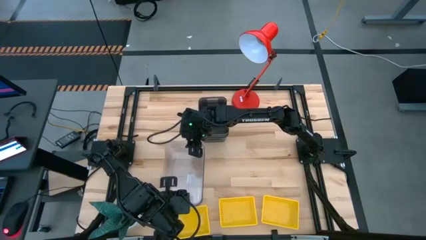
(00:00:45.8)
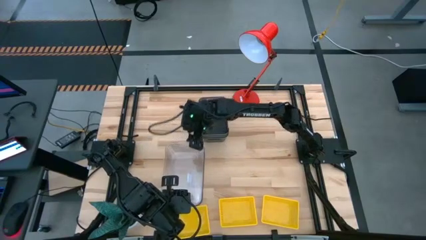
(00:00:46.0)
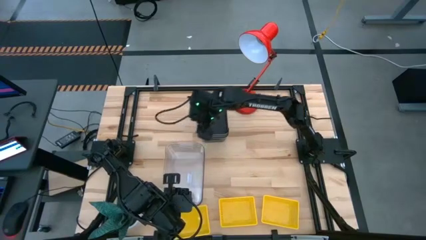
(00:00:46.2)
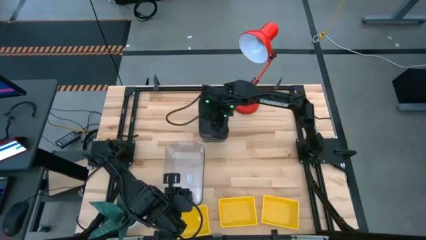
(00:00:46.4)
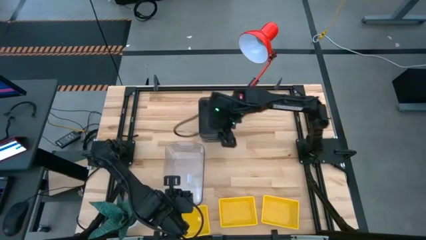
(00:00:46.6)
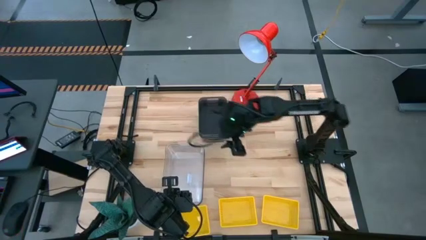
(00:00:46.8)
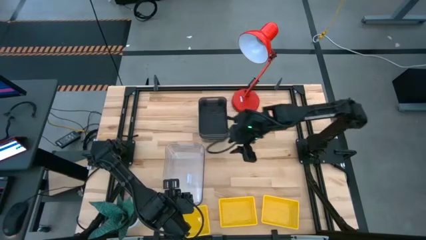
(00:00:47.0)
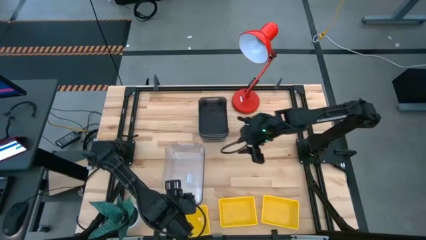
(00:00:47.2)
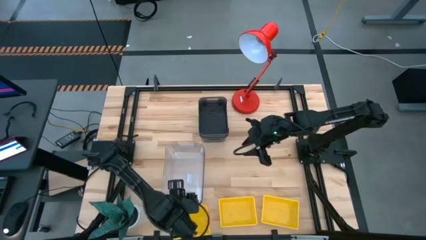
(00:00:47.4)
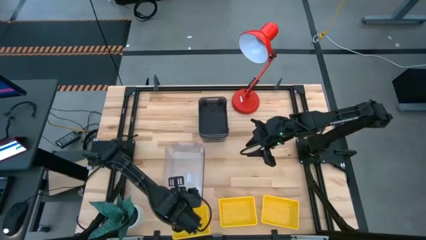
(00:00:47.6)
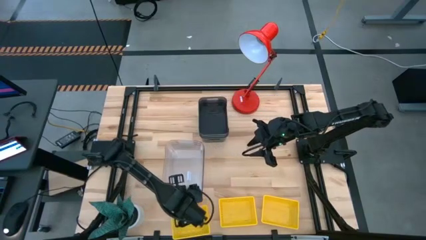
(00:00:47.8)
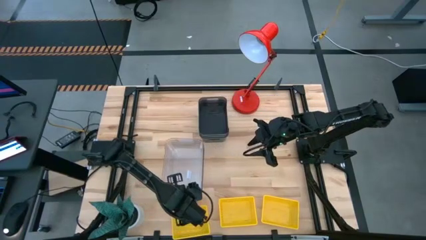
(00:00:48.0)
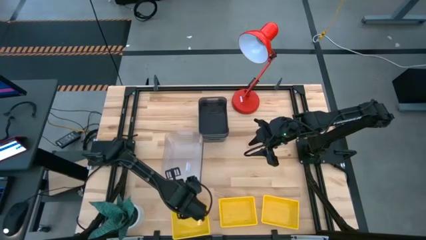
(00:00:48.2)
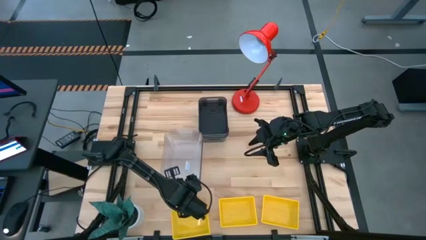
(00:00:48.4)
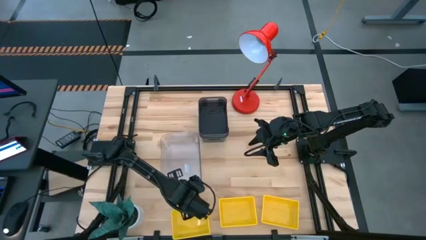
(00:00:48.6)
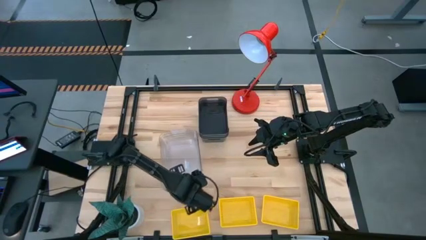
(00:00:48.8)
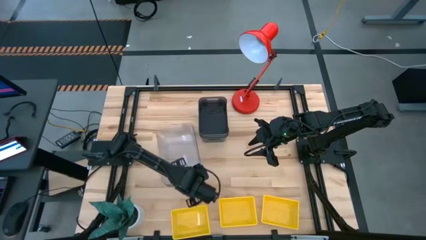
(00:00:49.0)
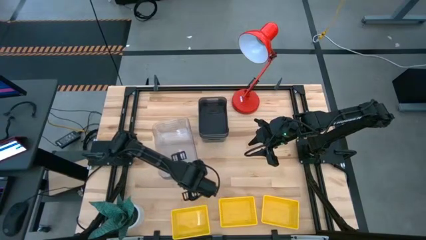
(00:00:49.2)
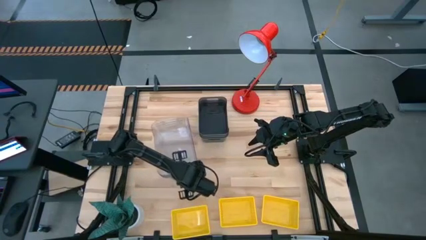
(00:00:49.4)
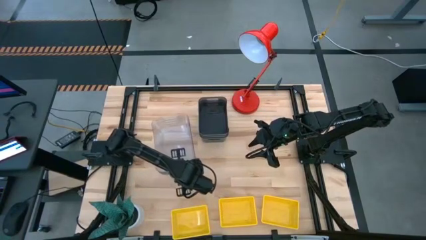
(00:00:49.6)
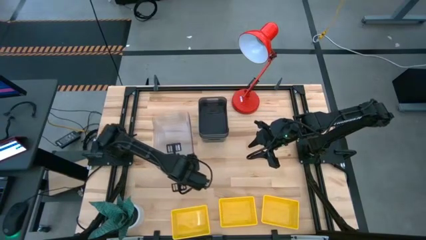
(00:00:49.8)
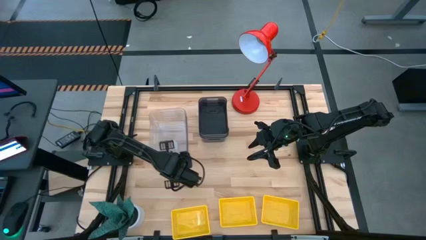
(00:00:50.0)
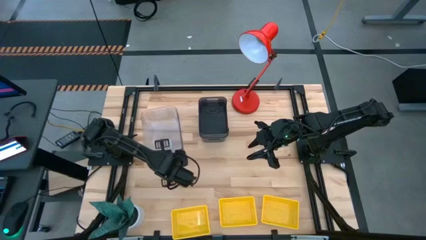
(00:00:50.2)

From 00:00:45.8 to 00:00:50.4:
Move the transparent bins to the top left of the table

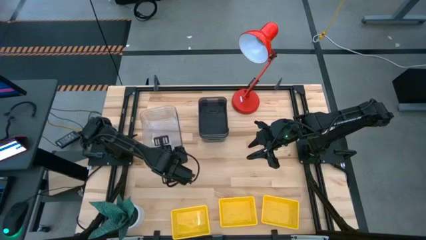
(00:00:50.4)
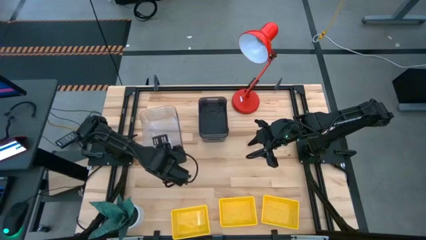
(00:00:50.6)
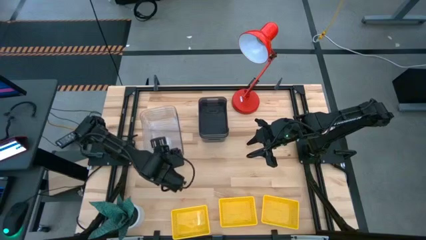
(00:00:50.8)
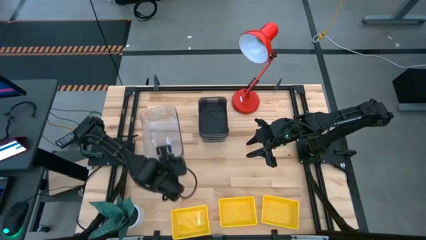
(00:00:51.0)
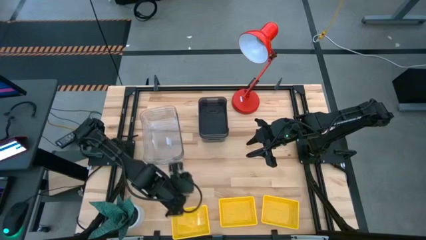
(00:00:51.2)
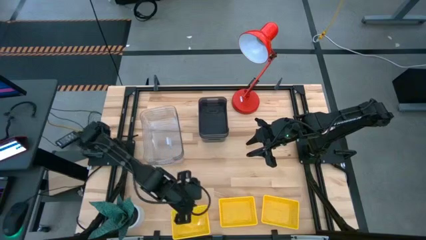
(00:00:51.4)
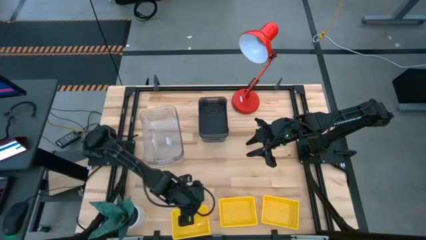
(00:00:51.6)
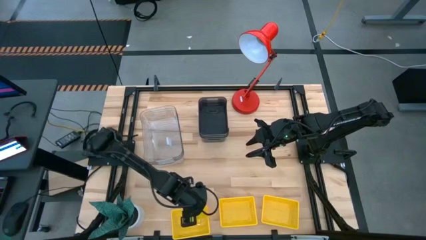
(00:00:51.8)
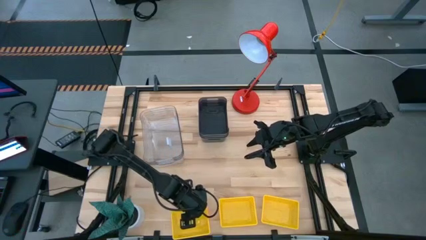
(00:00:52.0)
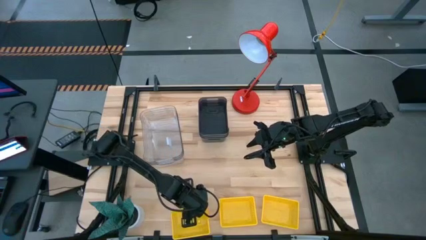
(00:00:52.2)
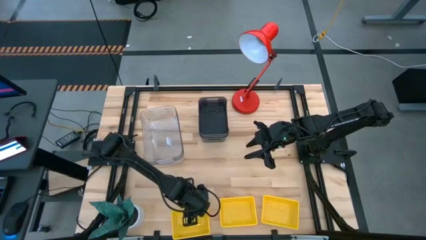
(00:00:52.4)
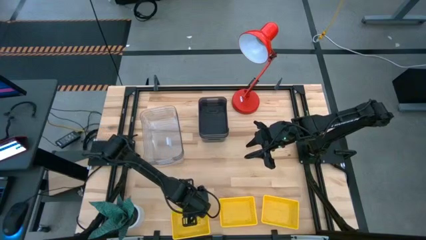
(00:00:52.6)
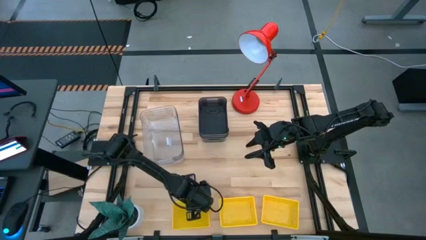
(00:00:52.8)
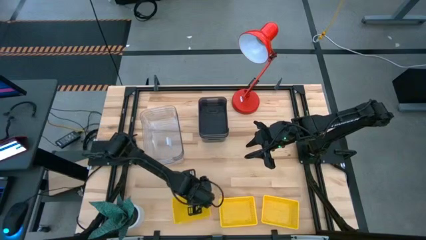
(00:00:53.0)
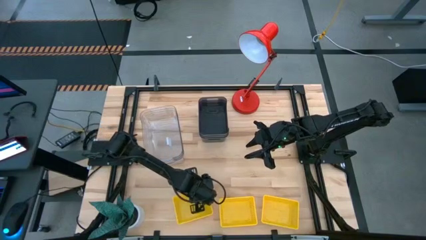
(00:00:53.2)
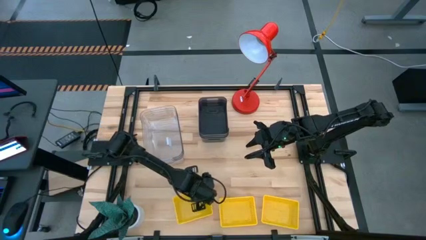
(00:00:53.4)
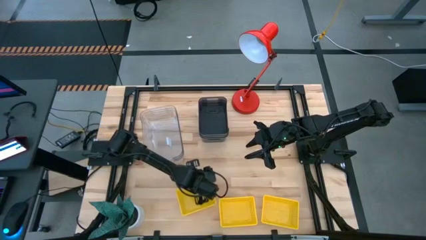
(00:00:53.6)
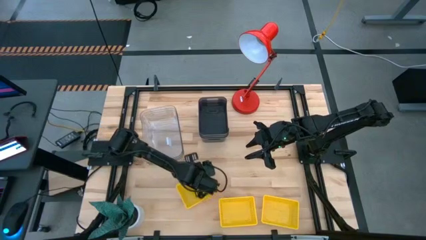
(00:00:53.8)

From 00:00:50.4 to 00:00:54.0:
Move the left yellow bin towards the center of the table

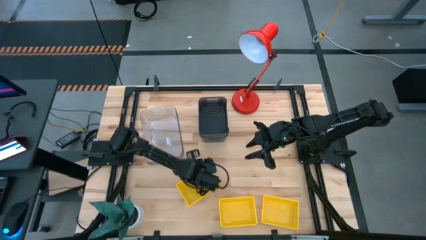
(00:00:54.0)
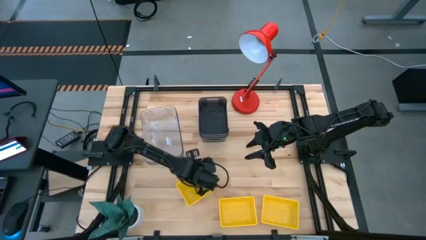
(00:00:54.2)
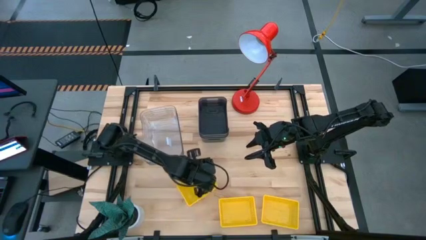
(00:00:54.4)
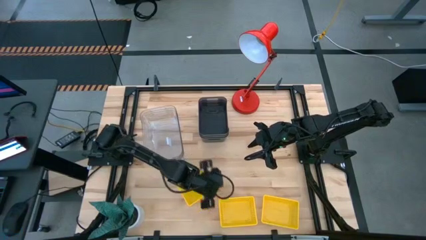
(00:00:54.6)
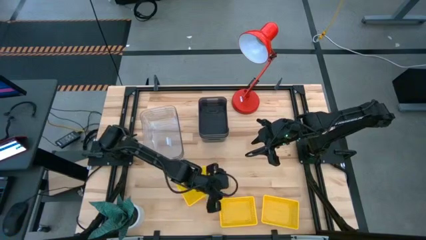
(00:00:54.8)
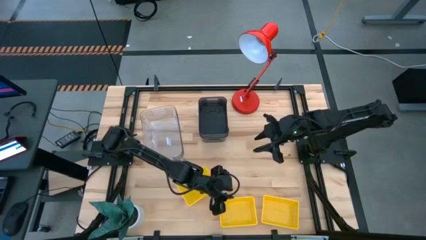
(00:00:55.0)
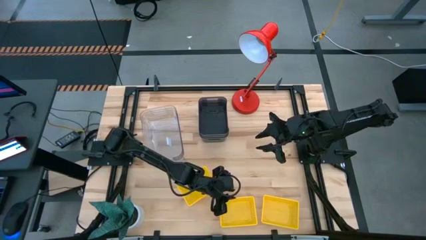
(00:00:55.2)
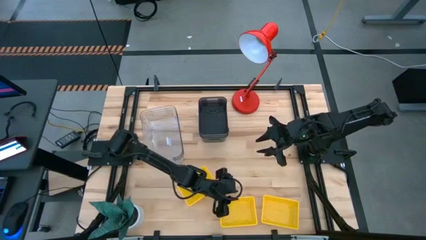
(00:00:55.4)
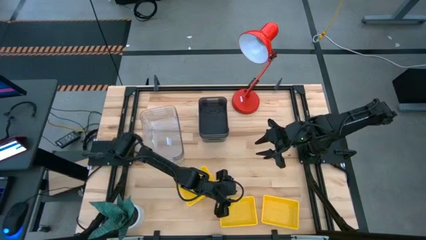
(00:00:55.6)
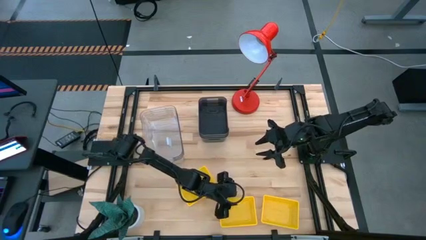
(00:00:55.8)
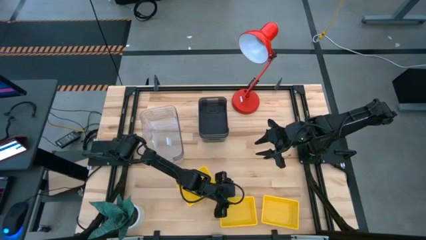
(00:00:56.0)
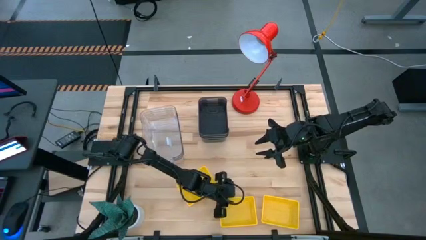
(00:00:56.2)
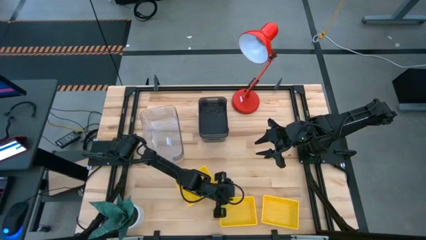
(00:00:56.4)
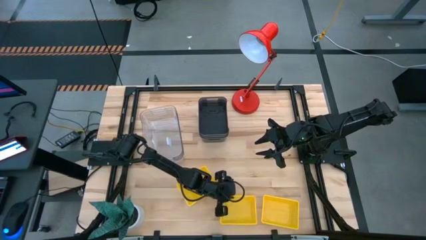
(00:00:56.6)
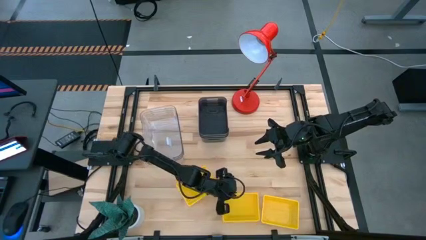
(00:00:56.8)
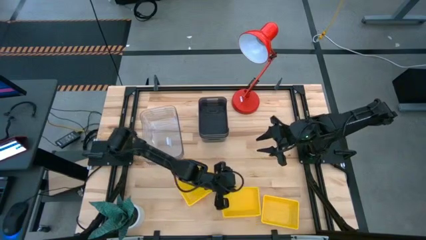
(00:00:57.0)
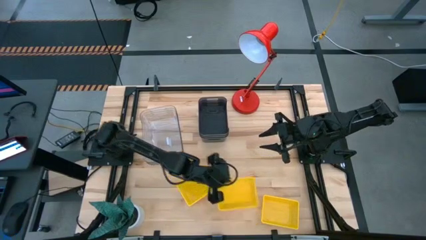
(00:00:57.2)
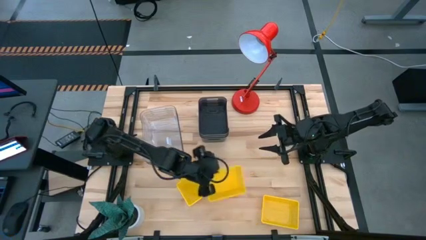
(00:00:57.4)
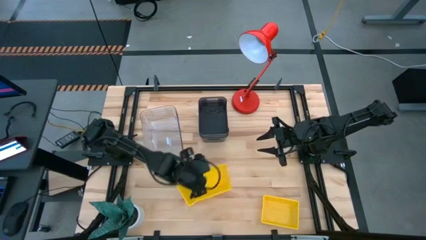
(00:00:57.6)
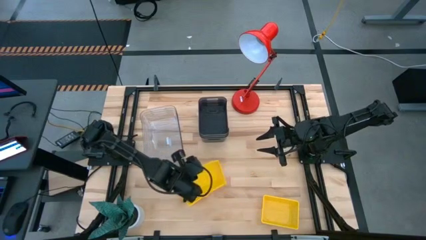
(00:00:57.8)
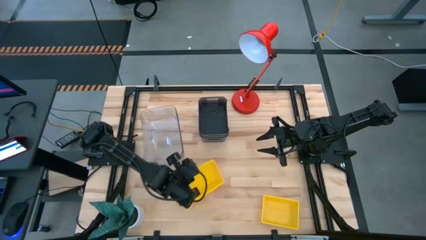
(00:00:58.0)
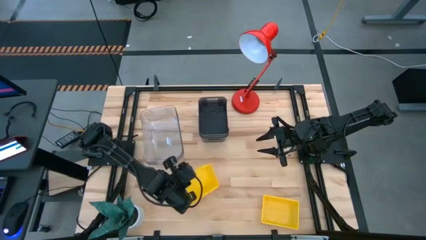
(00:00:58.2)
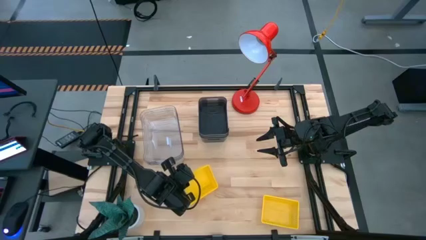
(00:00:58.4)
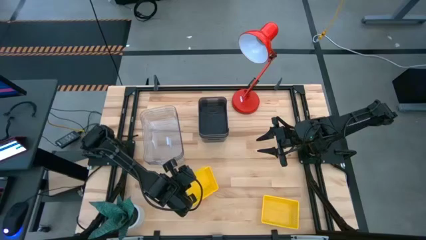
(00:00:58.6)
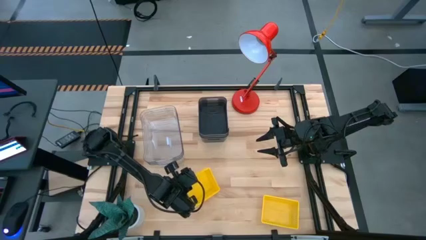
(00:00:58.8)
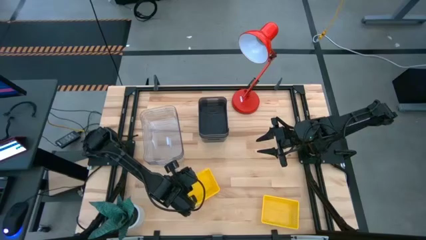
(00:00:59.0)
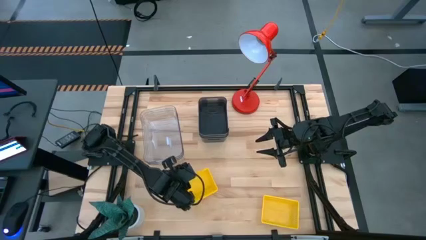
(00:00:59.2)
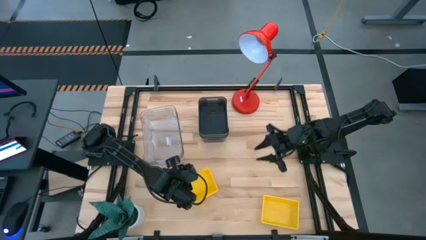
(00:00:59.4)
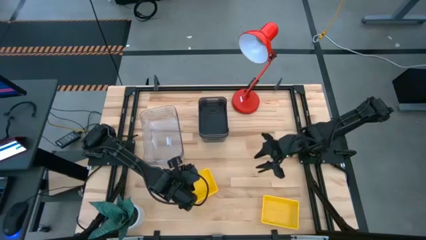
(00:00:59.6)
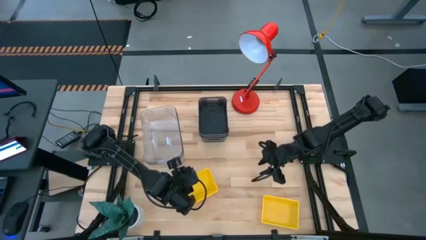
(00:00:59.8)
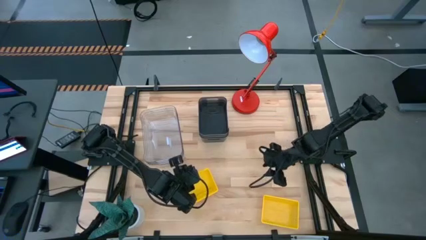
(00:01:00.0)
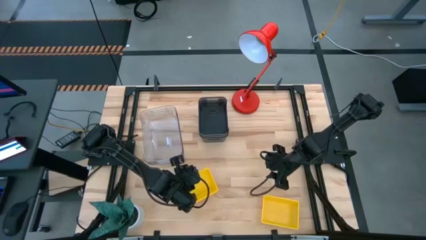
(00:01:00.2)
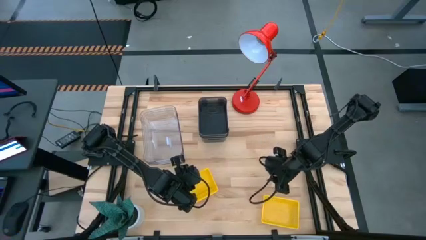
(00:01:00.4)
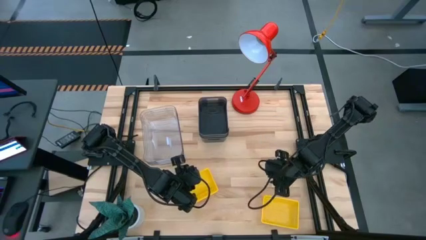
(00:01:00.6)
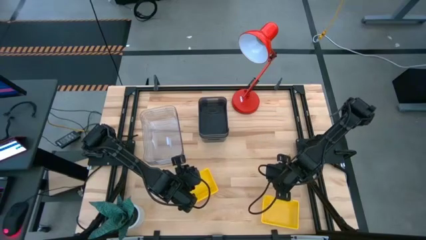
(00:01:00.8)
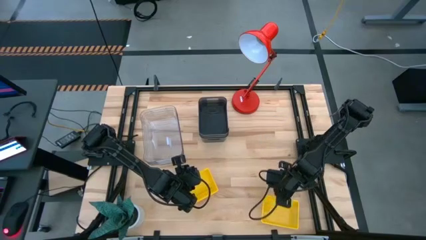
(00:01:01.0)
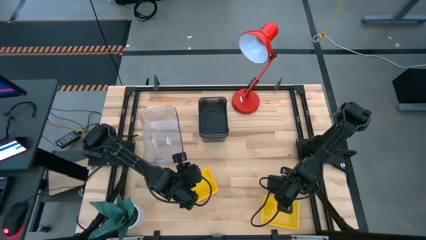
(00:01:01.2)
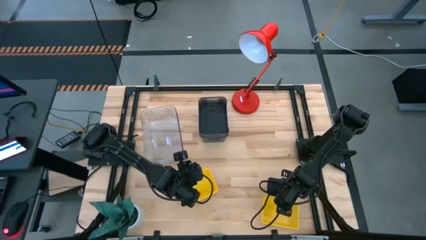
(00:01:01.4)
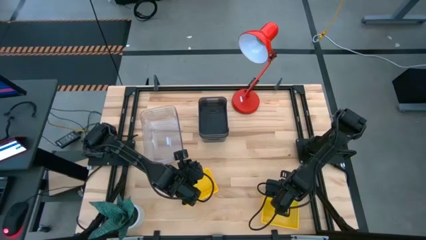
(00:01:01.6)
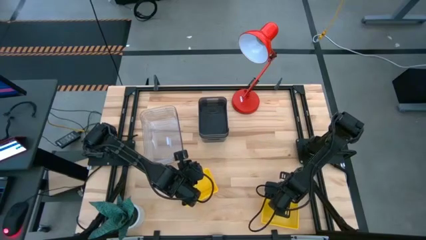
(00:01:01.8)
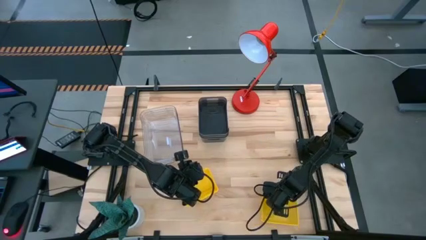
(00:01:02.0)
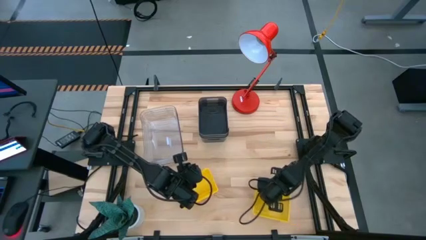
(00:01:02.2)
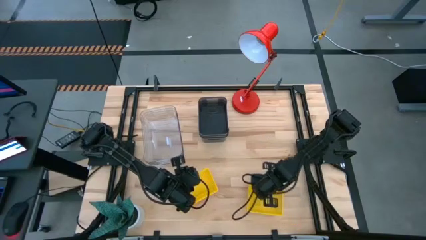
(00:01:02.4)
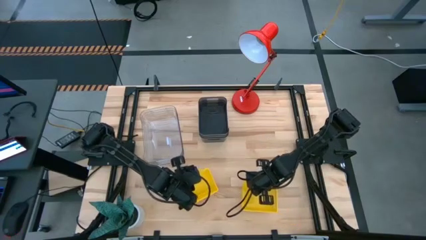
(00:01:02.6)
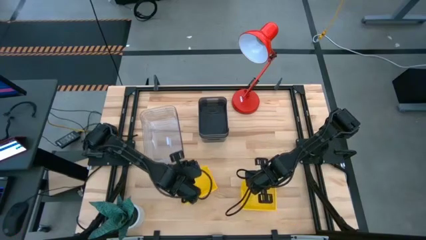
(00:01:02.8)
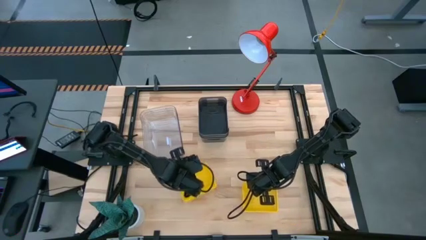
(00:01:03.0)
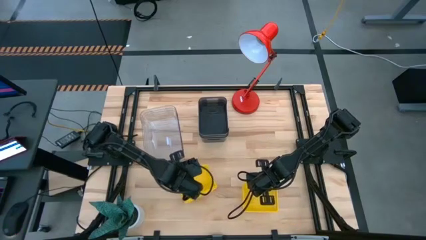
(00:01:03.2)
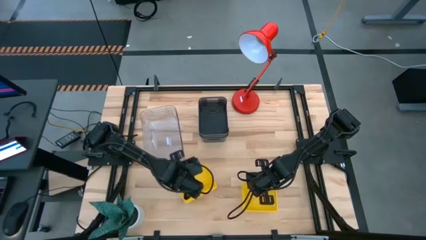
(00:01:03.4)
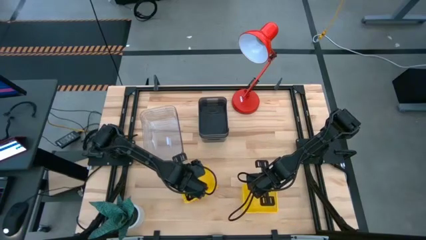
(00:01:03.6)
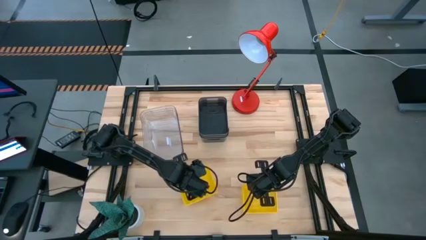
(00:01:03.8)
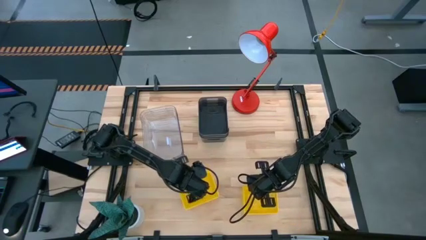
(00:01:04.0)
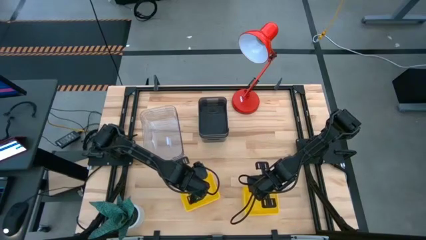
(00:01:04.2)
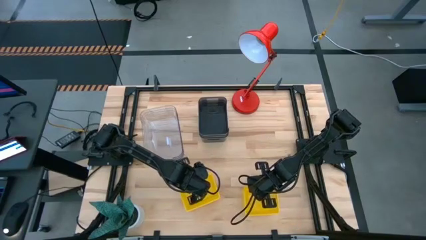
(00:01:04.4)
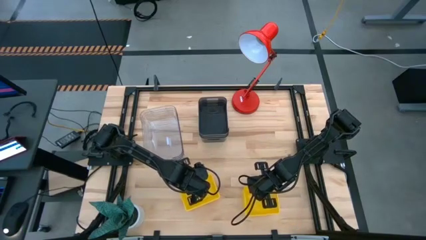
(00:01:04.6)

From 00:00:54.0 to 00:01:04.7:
Stack the bottom left yellow bin on top of the top yellow bin
